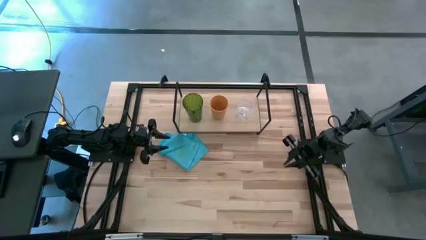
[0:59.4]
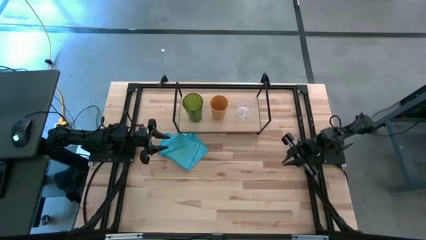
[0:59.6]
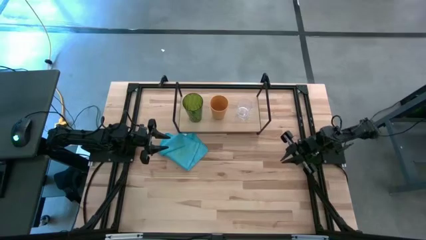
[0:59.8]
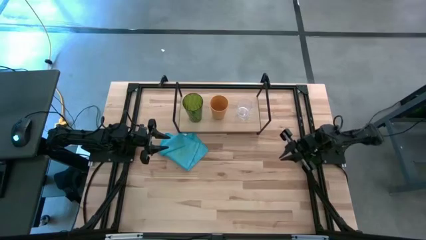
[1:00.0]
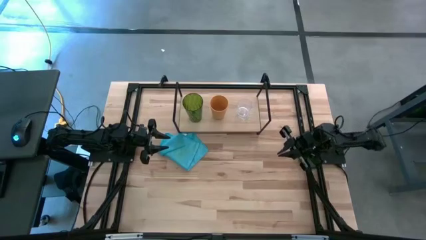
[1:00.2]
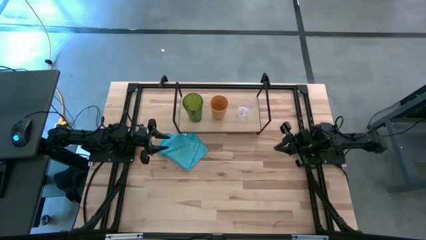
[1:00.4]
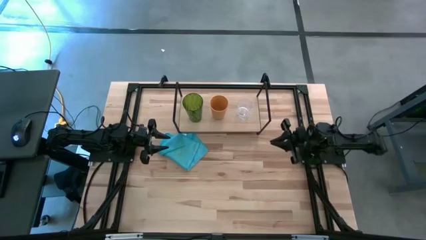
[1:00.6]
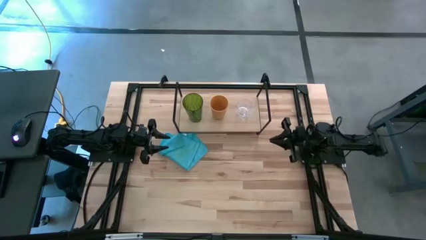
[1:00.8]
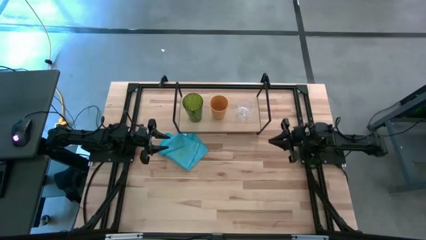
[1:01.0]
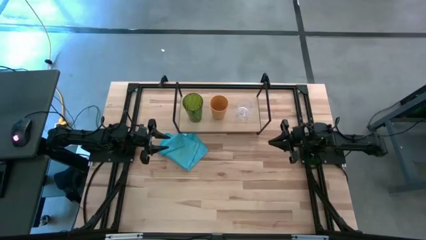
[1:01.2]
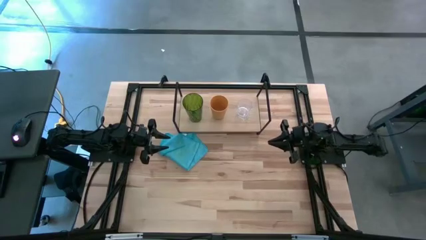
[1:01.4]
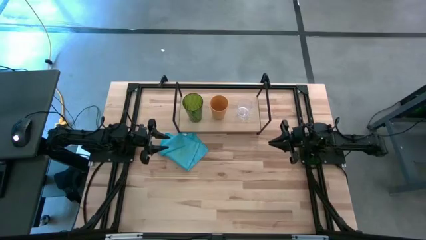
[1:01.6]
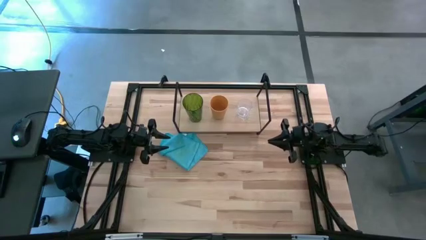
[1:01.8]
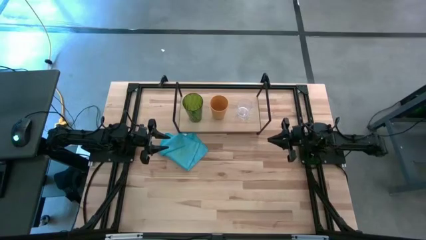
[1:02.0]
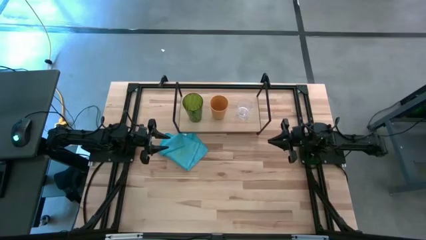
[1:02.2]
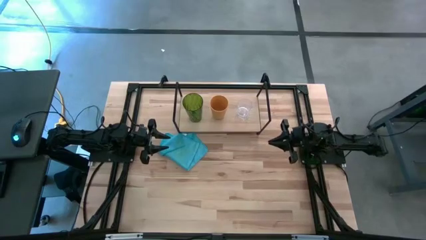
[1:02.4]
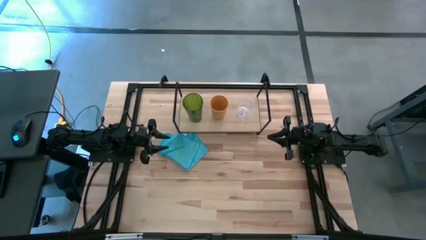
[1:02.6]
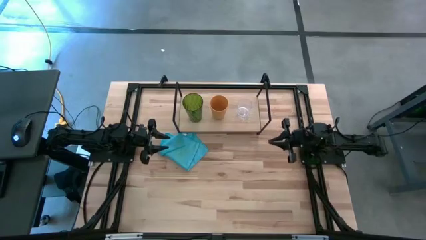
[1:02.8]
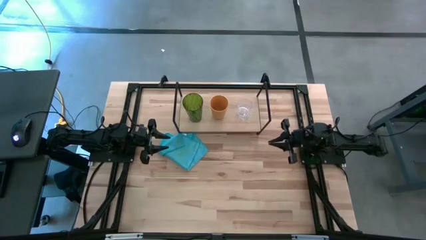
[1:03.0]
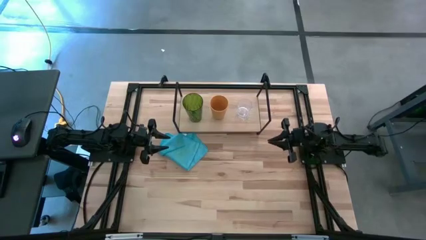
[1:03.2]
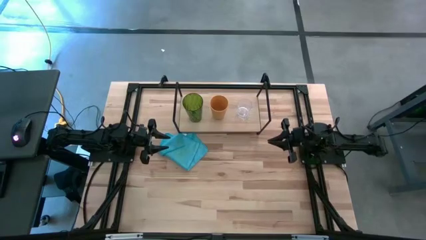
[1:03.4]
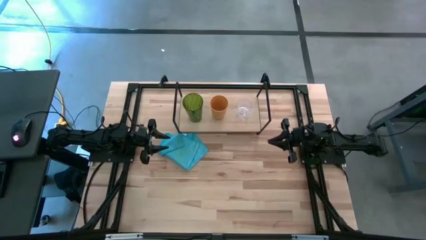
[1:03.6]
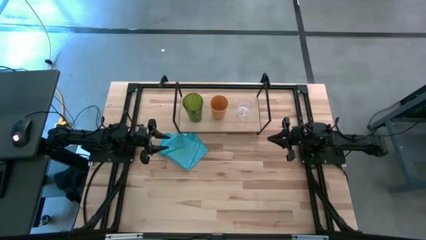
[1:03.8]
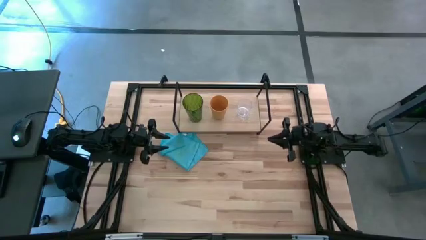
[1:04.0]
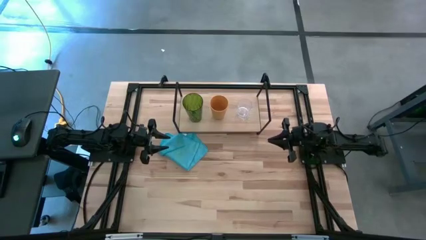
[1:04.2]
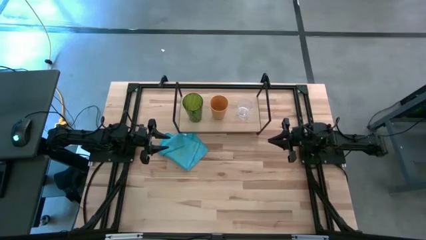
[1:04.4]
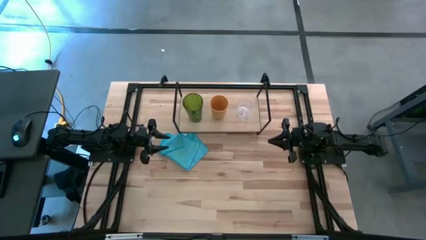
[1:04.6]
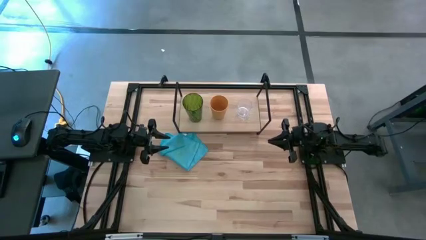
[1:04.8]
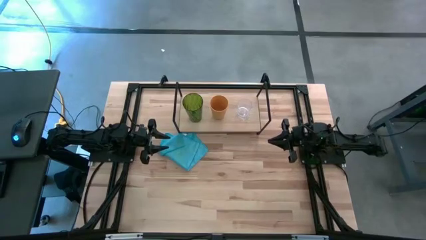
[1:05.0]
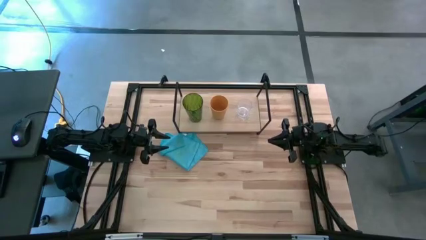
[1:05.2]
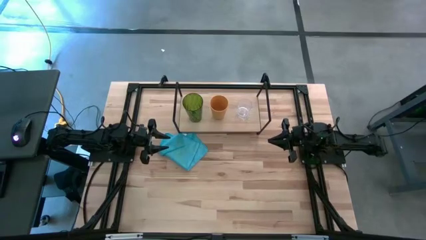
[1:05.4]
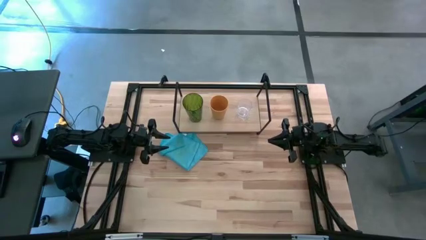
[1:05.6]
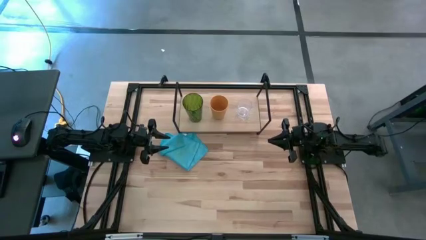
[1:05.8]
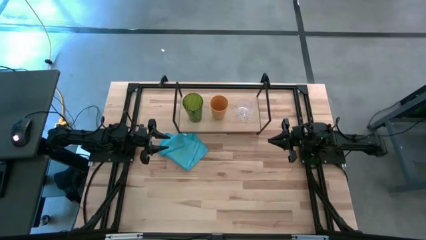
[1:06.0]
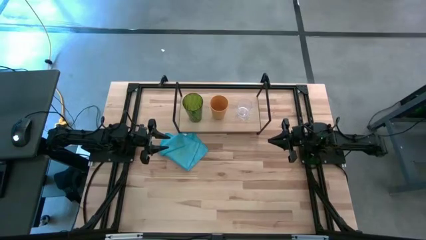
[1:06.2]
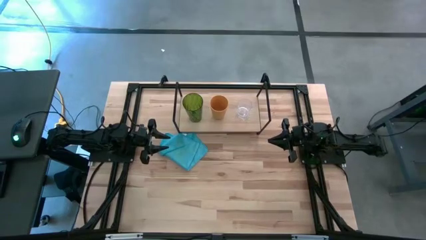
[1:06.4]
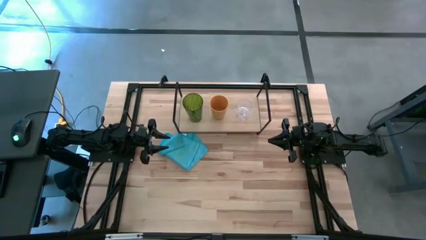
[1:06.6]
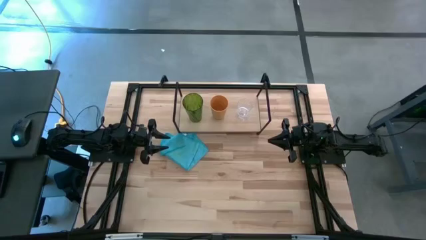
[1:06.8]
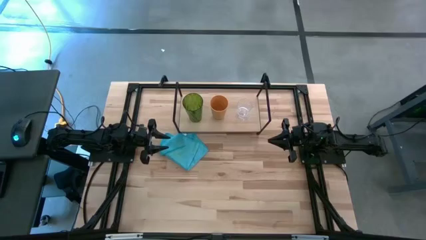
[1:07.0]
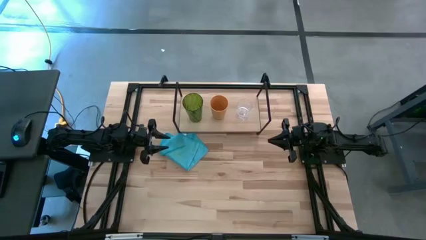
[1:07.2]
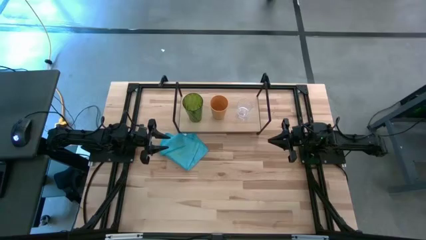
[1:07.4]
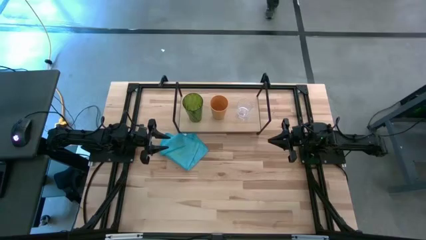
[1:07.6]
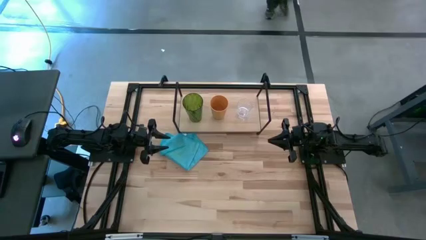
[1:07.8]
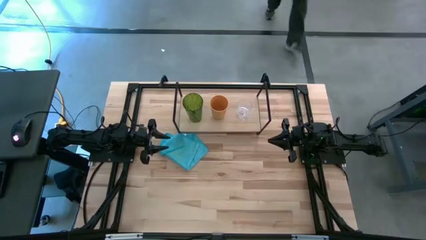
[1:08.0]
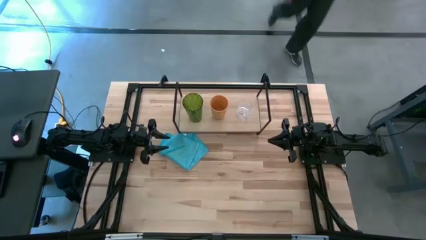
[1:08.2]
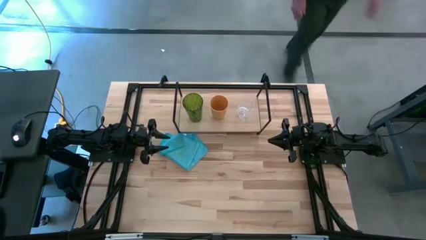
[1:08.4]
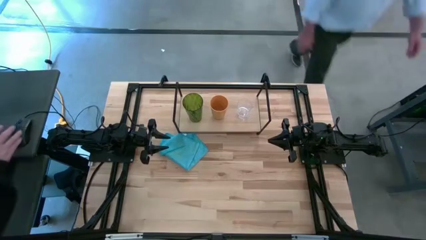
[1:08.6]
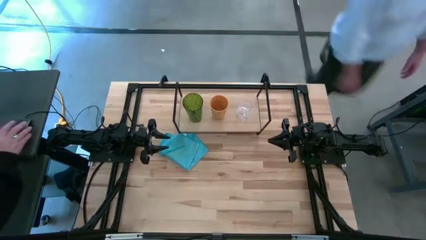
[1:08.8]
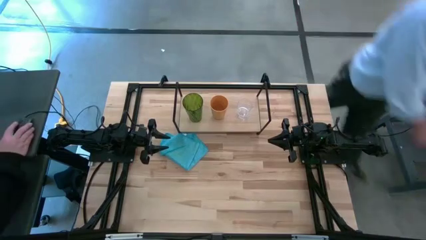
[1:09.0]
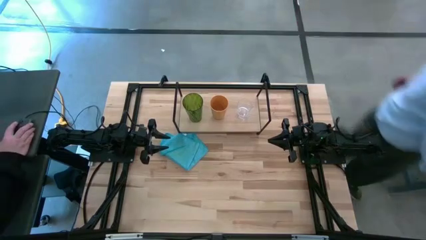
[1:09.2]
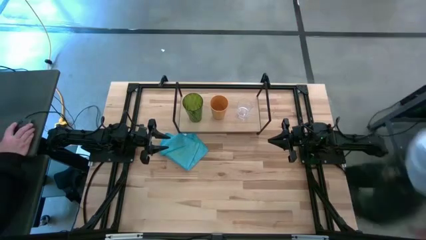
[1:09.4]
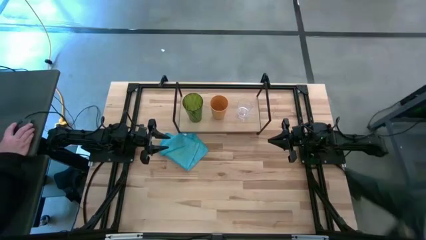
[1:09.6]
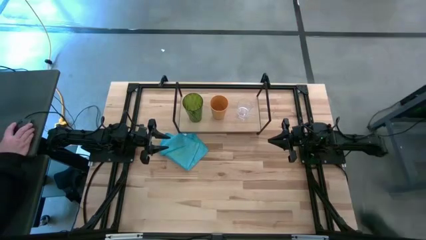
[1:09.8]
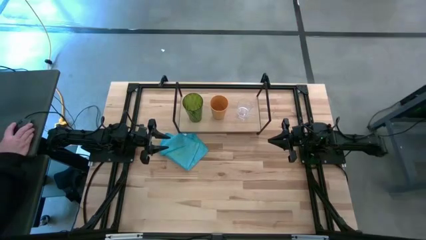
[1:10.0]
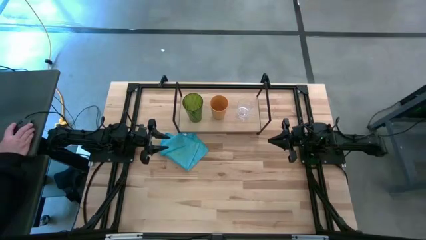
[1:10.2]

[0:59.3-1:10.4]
Task: Stack small to large cups/mugs on shelf
Return to Home Position

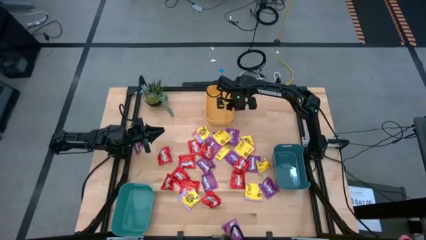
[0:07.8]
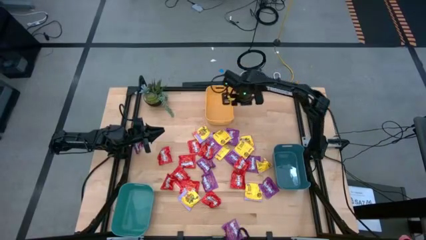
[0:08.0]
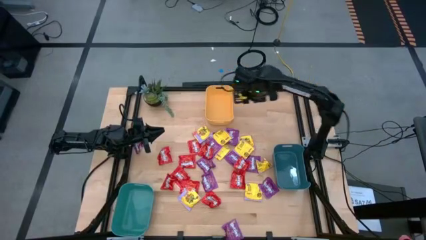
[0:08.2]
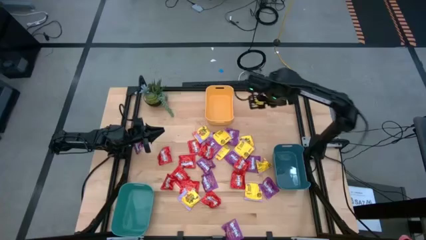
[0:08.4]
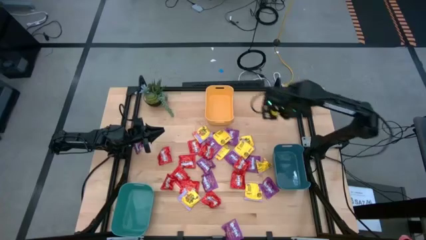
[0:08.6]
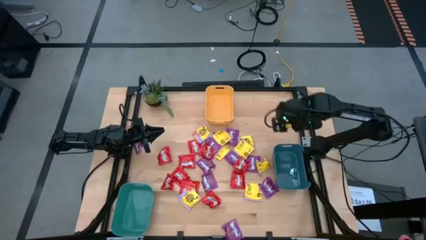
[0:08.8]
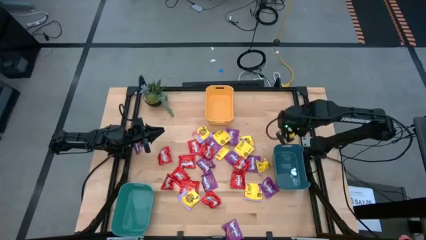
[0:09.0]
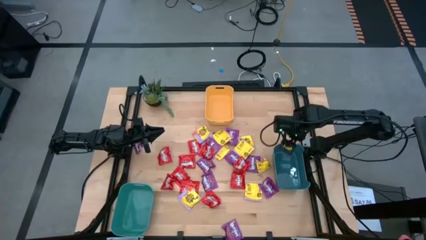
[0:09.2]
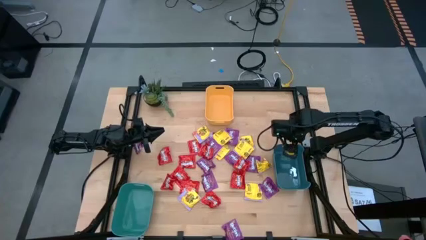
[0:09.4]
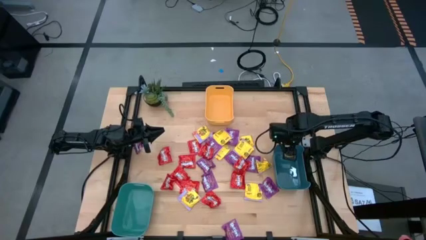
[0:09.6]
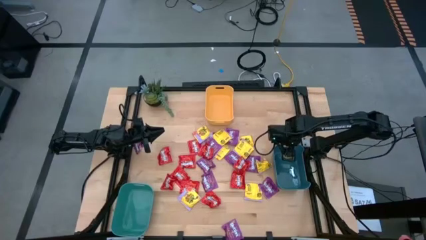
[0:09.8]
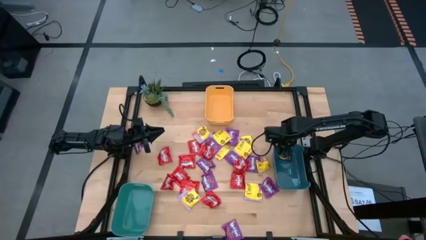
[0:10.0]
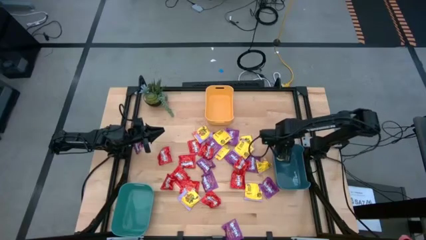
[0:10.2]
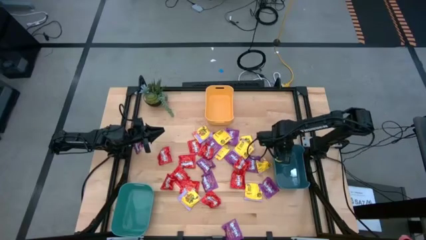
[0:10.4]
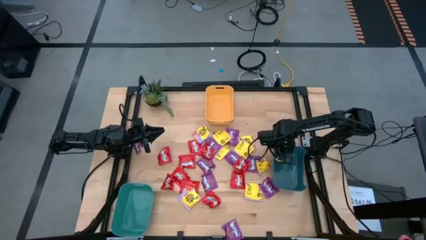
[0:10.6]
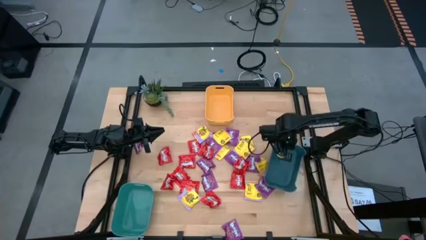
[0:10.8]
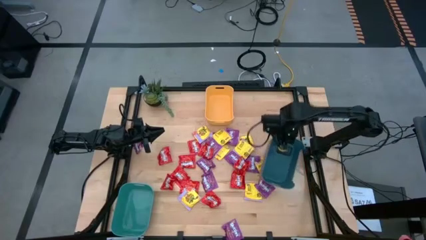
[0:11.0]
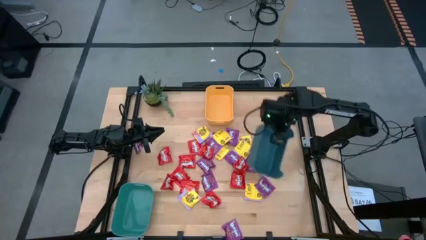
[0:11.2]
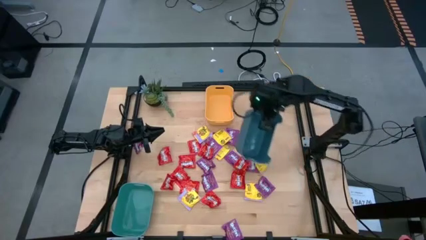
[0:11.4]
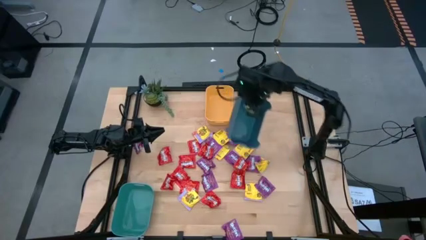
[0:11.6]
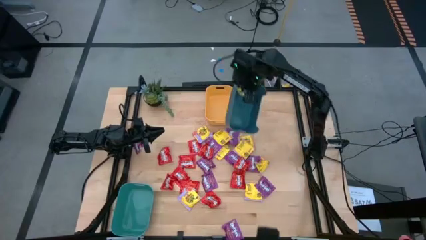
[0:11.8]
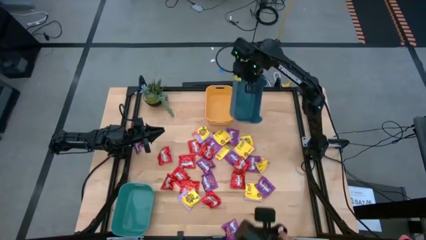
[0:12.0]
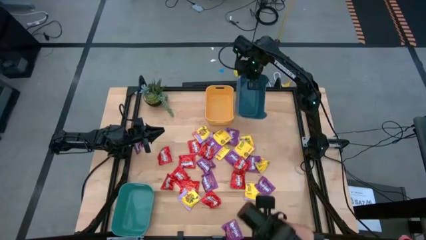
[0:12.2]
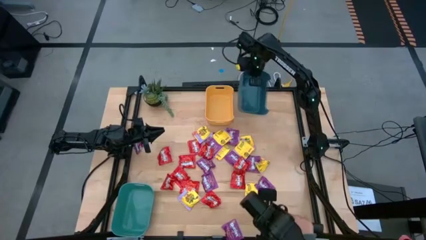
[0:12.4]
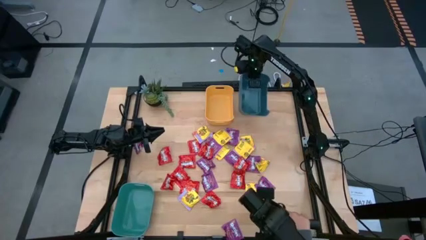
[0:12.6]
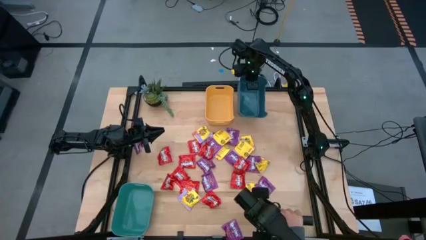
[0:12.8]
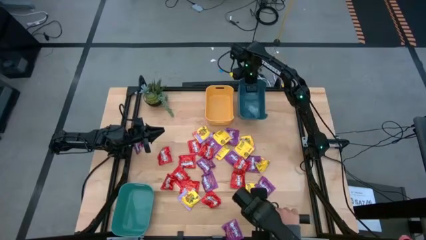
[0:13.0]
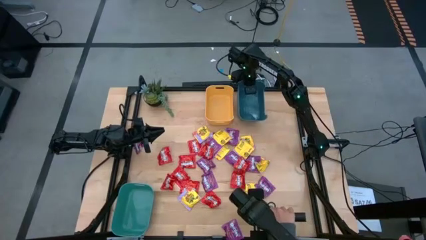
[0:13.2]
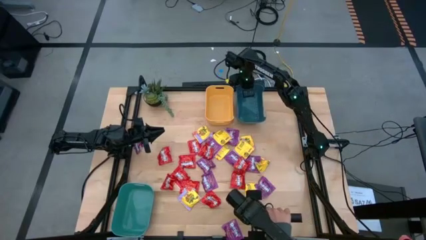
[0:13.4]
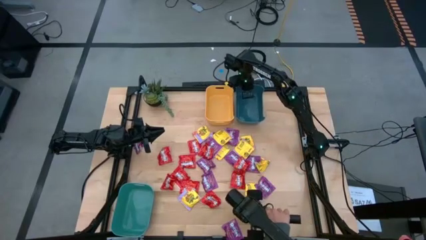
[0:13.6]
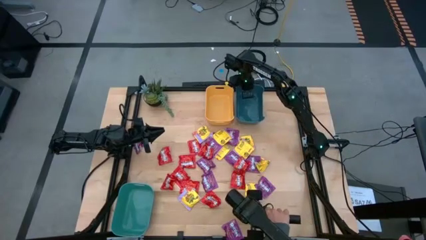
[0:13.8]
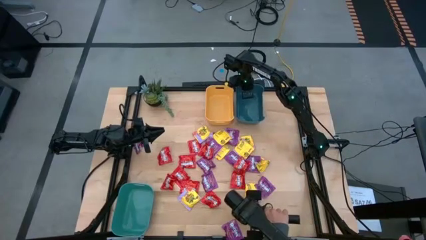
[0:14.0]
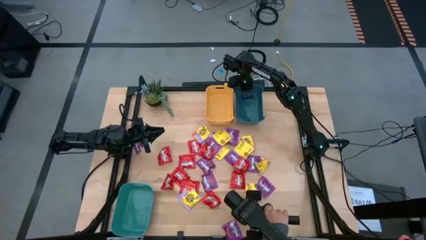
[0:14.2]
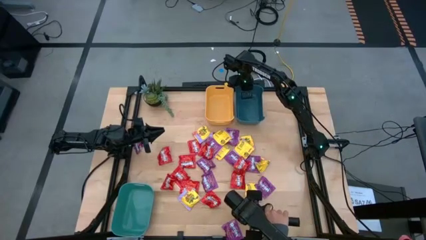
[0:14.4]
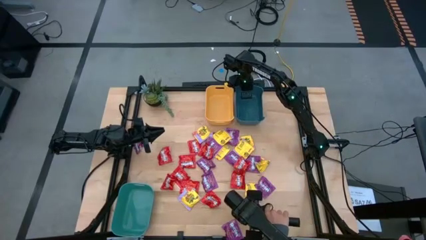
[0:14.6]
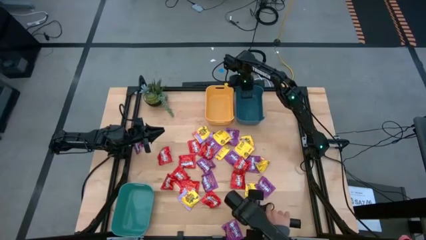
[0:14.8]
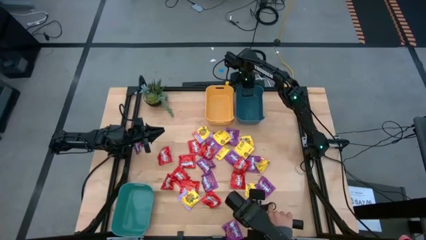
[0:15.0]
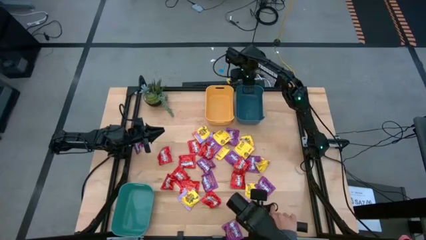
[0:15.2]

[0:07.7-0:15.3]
Task: Sort candy
Move the dark blue bin to the right side of the yellow bin
